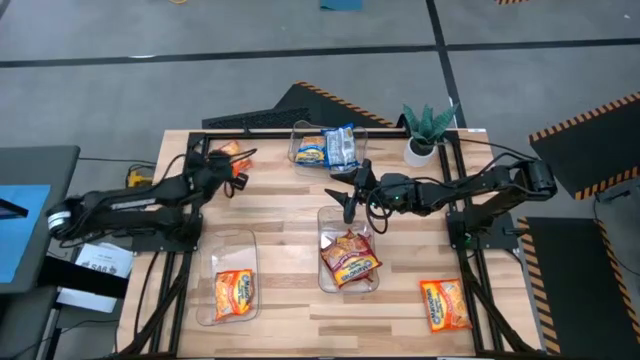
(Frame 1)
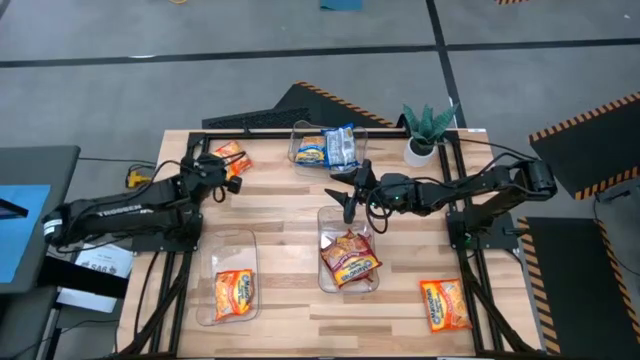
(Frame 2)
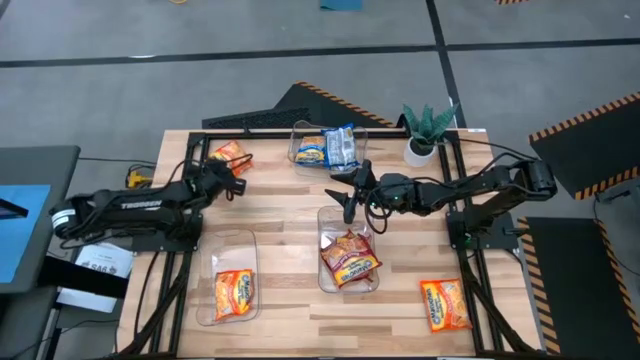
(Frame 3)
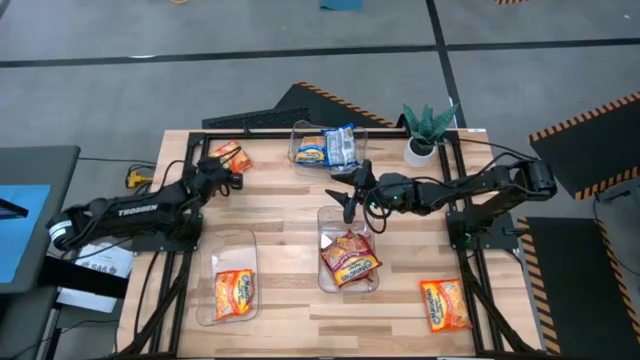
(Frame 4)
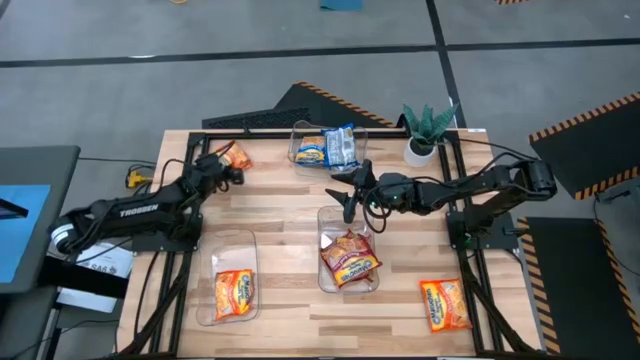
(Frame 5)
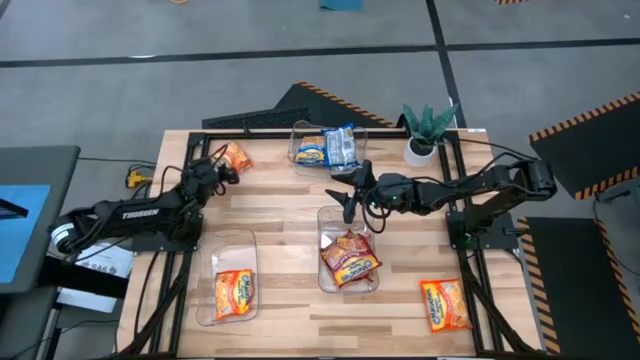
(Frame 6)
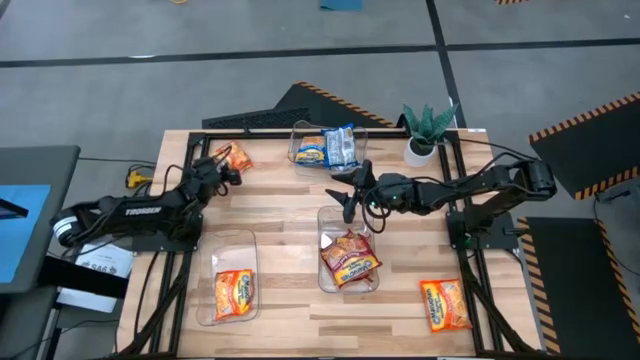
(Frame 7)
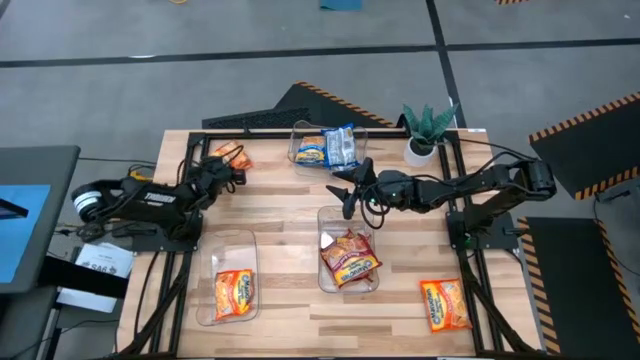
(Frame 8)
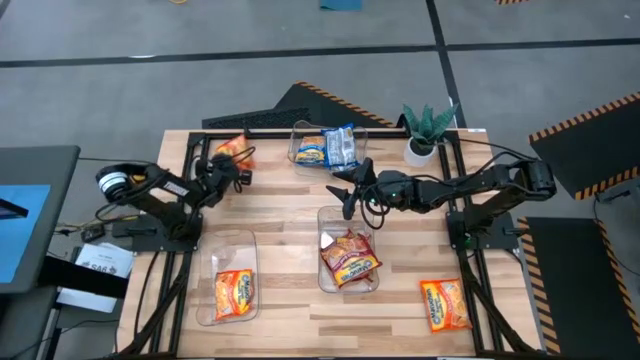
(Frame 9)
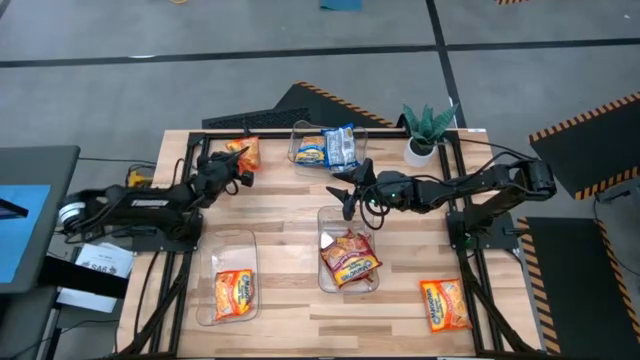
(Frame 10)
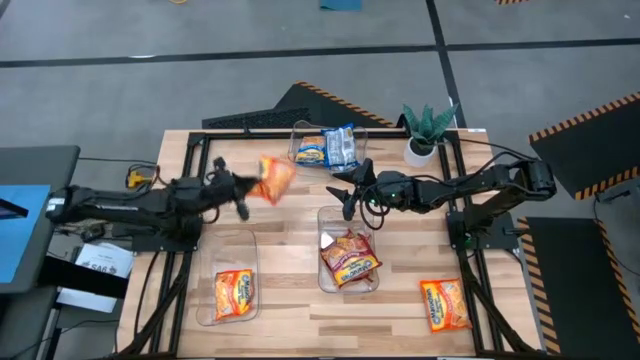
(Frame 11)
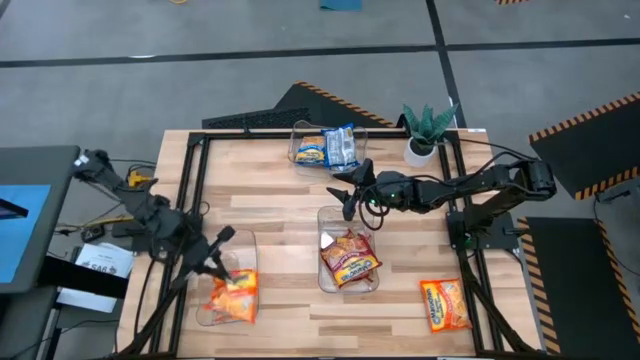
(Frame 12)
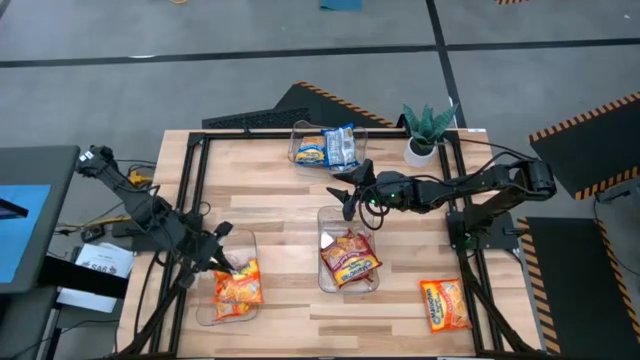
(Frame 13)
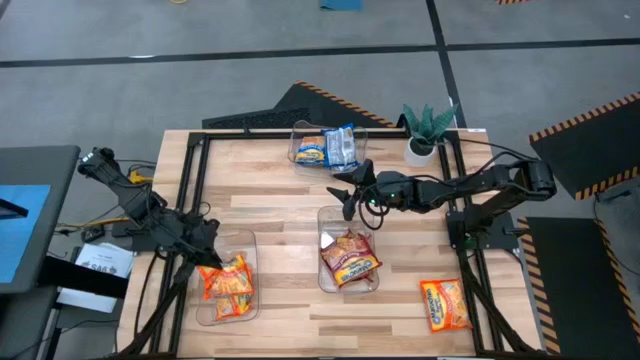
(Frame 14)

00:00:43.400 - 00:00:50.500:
Task: Sort Maruchan noodles
Put the top orange noodle pack into the left transparent bin

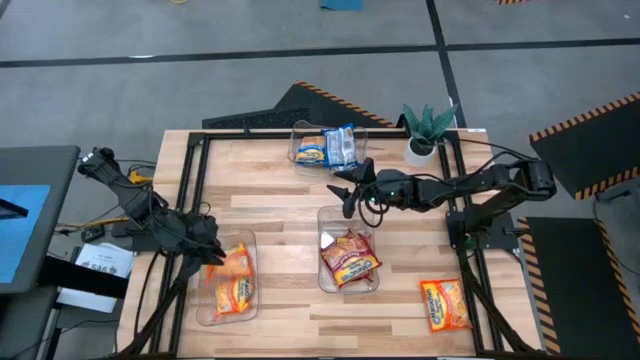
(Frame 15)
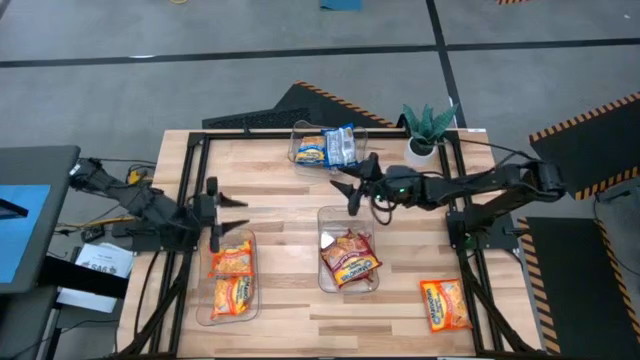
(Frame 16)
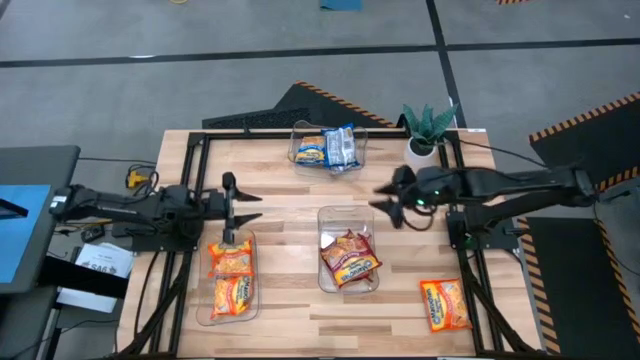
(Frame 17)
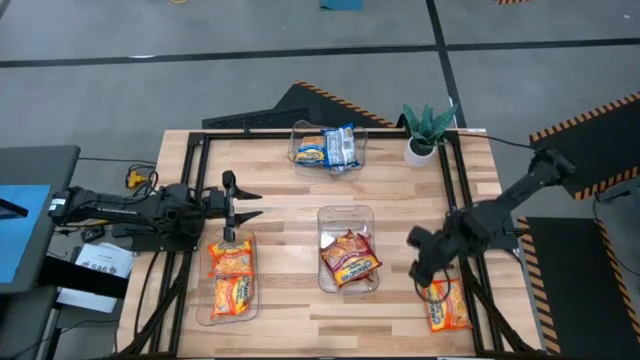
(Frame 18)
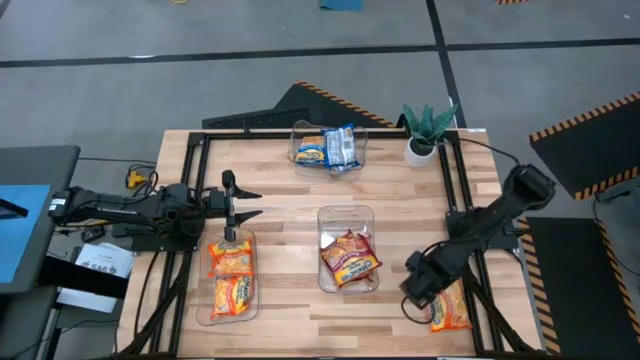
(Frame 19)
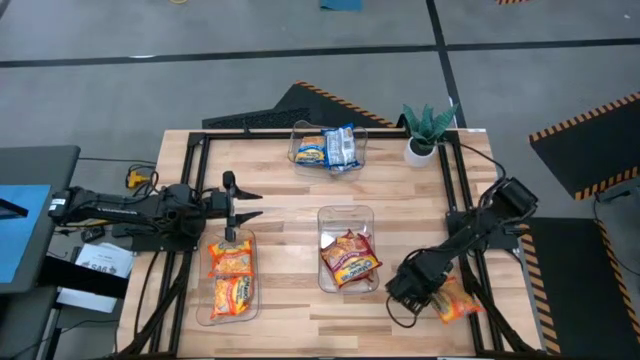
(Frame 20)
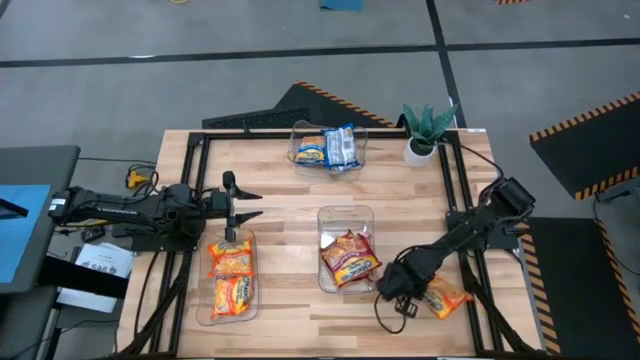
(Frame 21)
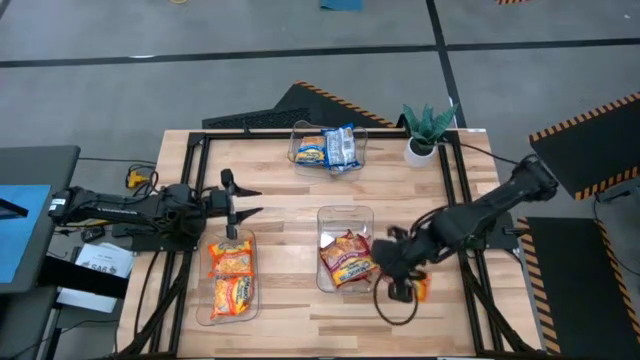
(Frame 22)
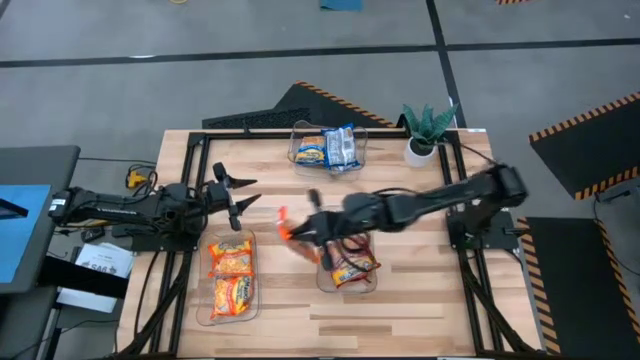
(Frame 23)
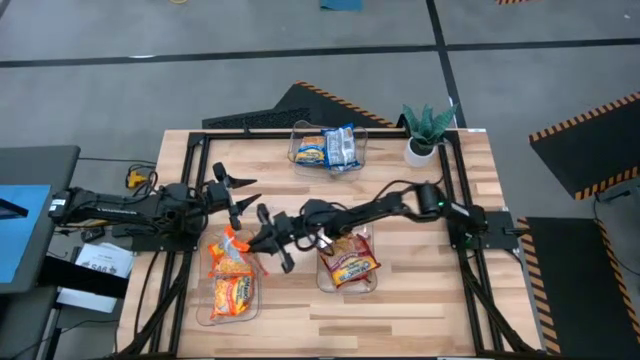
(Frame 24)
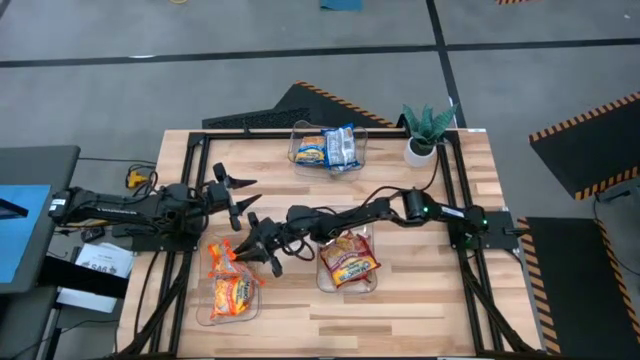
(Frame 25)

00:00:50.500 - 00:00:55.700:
Put the orange noodle pack into the left transparent bin

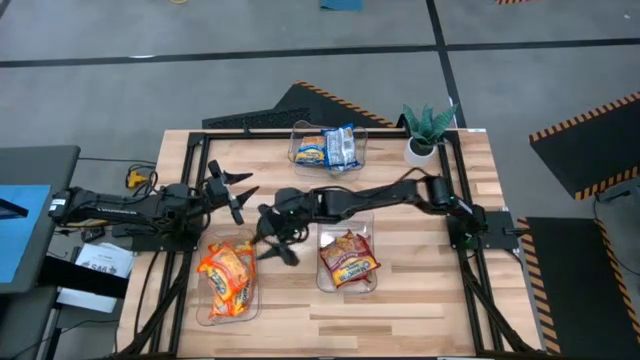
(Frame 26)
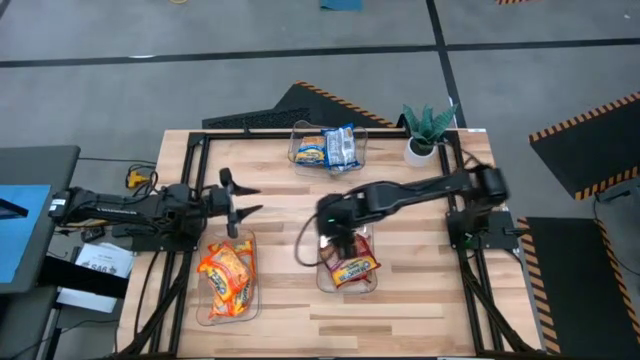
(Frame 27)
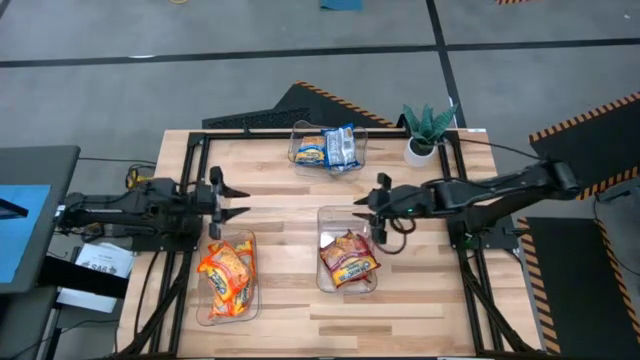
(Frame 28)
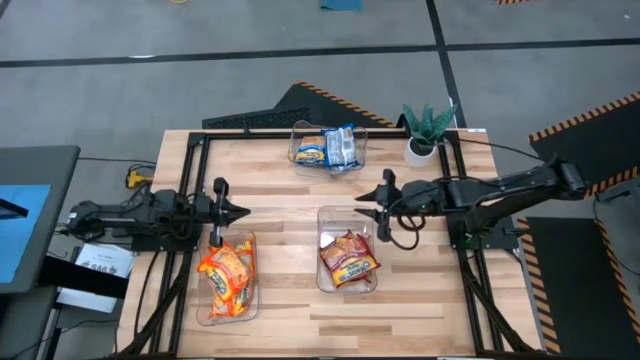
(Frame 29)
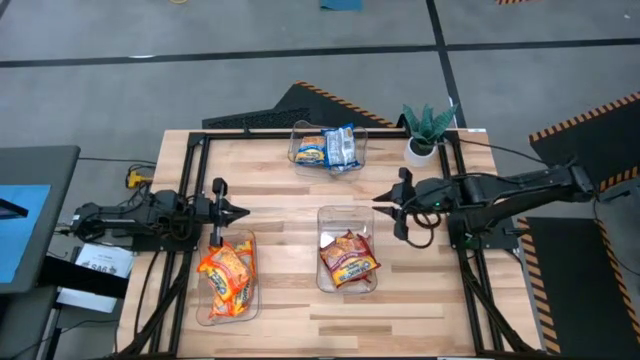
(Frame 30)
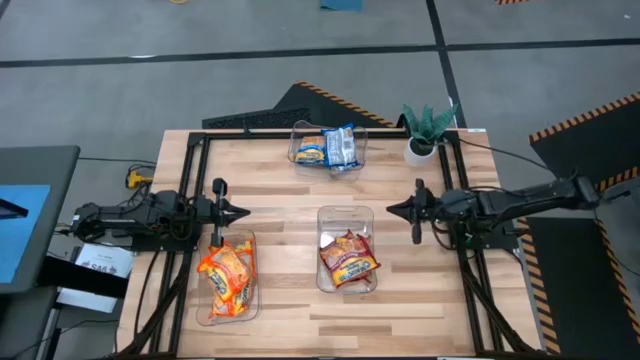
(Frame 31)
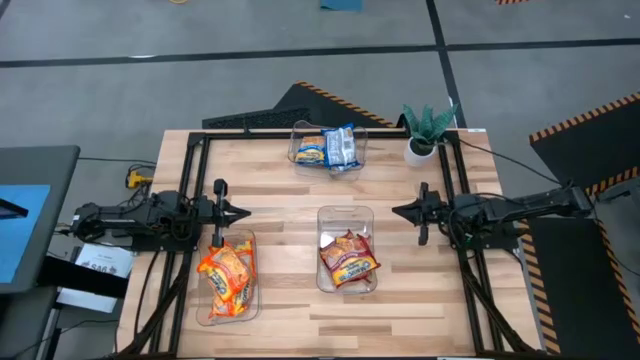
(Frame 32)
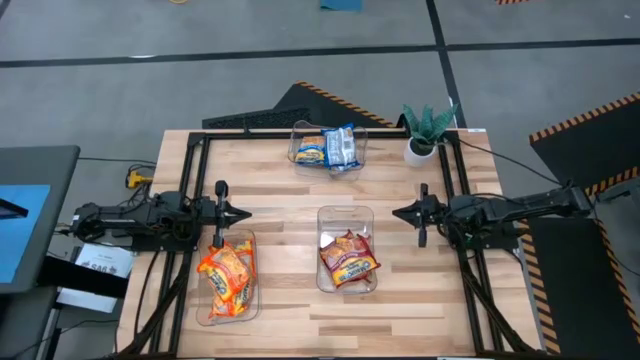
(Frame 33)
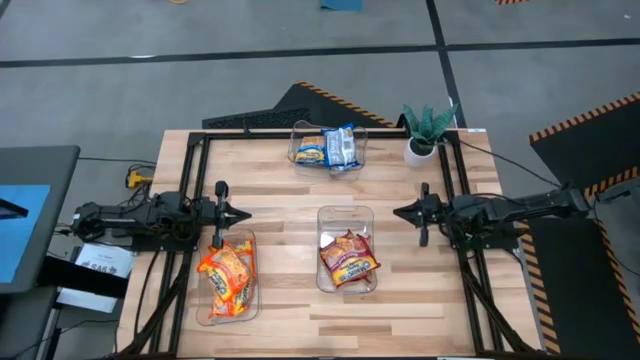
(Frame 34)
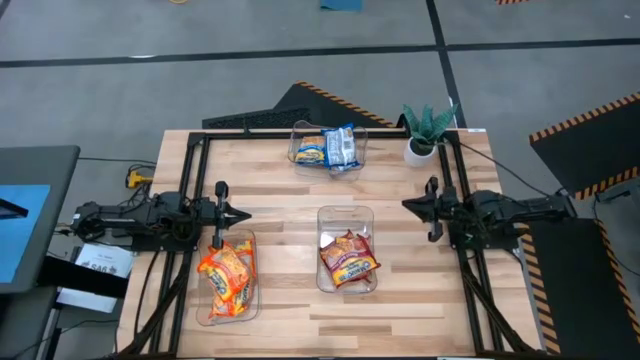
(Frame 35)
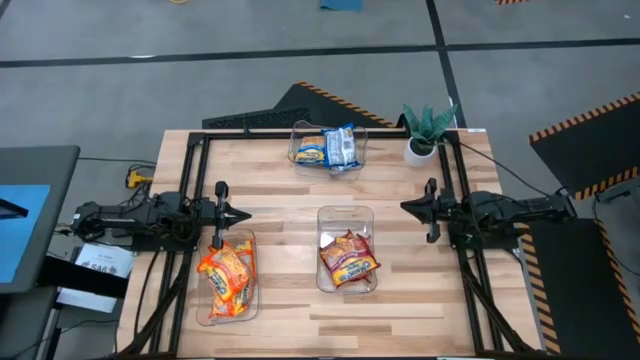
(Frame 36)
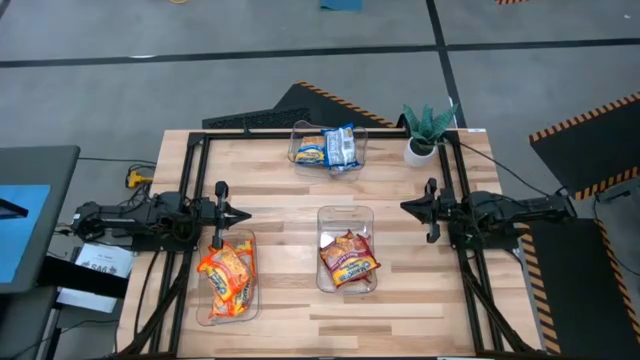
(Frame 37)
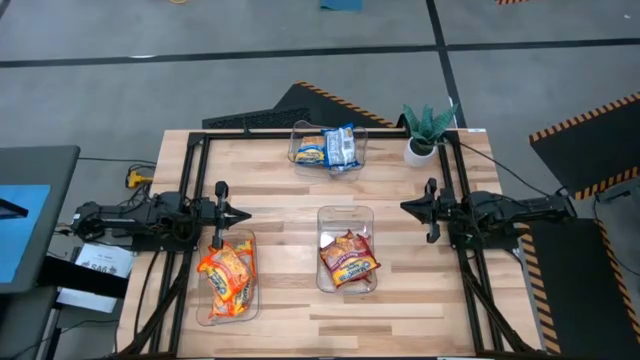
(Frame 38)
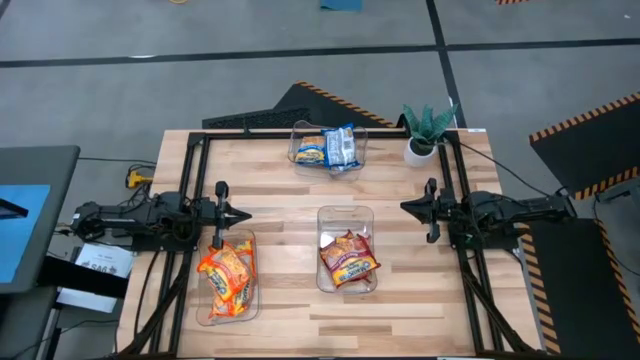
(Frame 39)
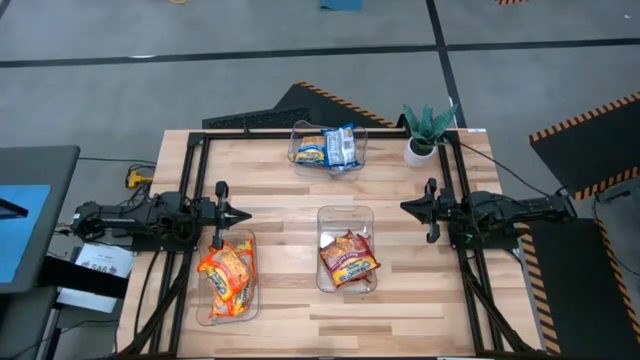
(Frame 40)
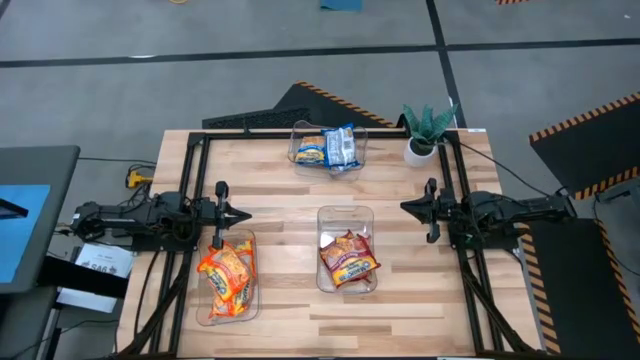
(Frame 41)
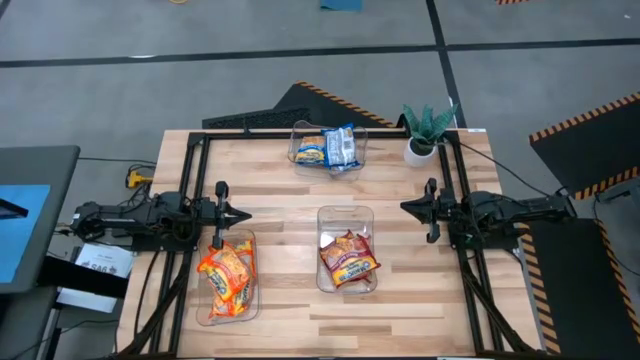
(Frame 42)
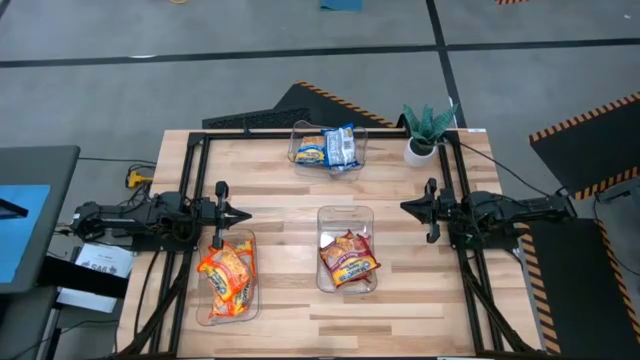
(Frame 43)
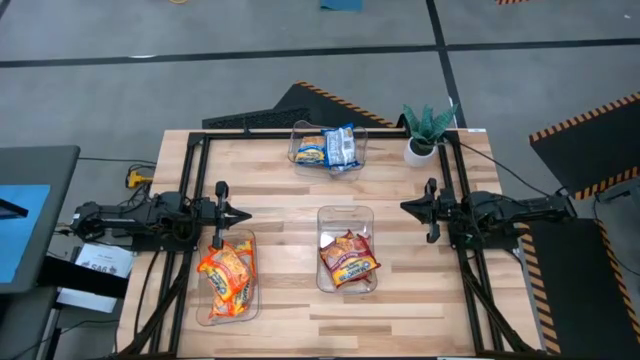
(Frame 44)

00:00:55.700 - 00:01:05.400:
Return to Home Position
